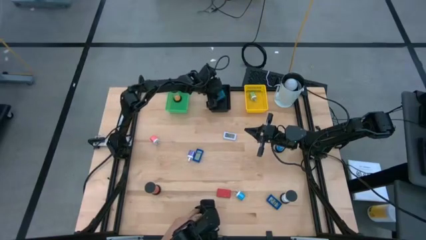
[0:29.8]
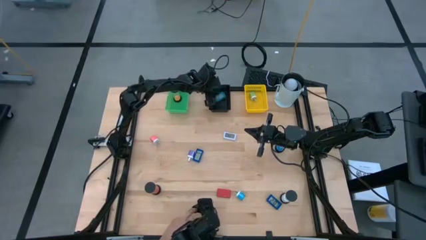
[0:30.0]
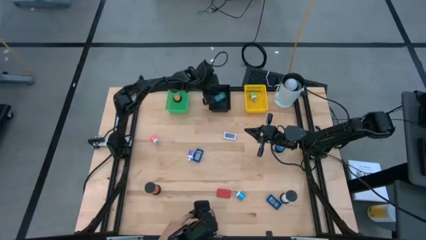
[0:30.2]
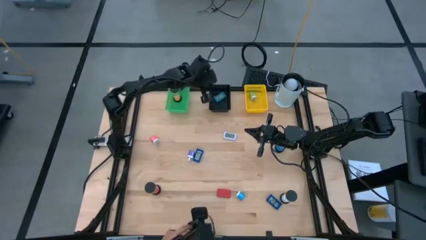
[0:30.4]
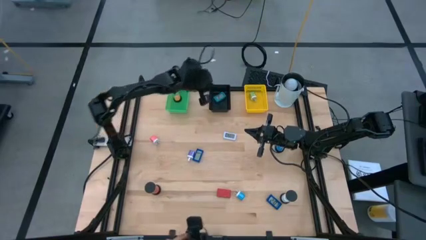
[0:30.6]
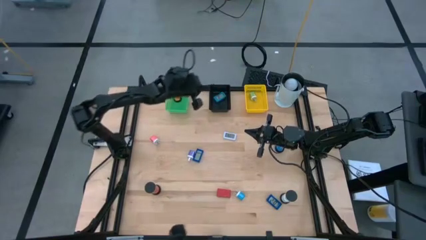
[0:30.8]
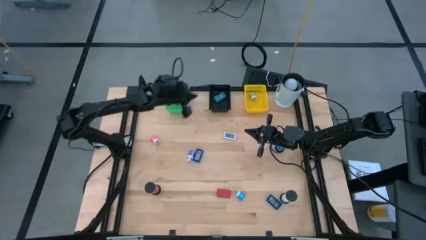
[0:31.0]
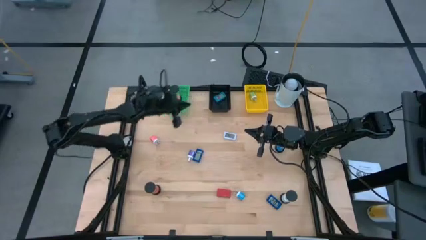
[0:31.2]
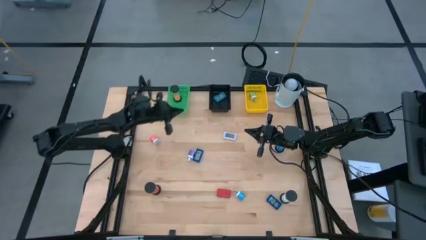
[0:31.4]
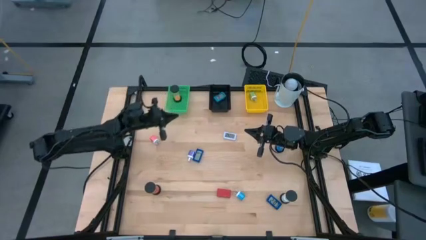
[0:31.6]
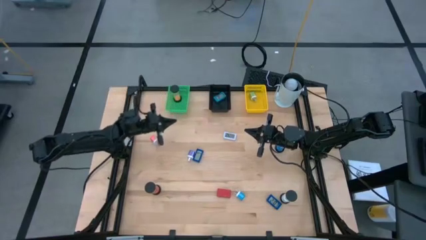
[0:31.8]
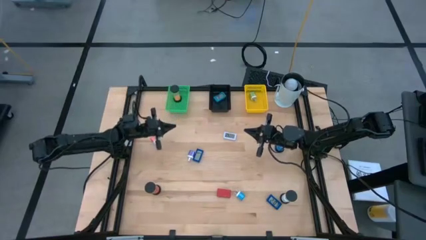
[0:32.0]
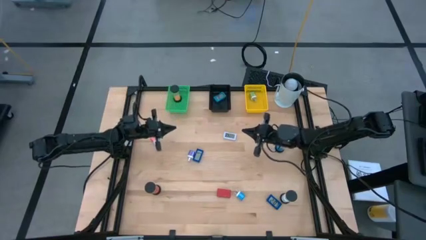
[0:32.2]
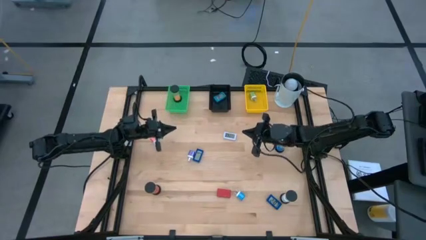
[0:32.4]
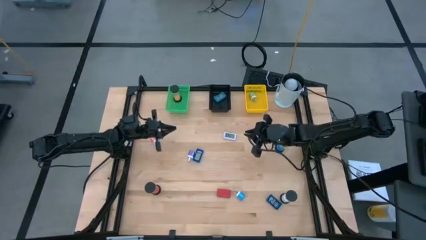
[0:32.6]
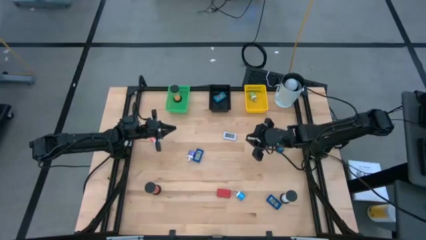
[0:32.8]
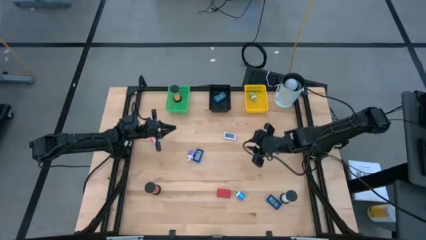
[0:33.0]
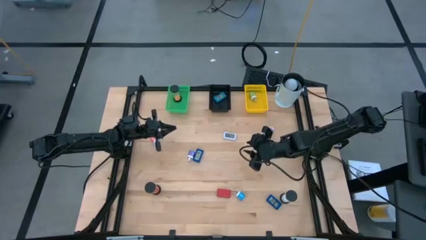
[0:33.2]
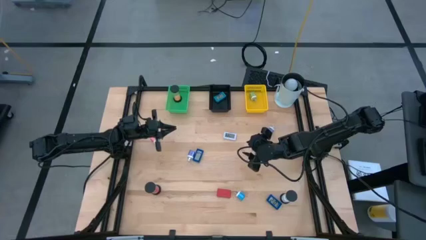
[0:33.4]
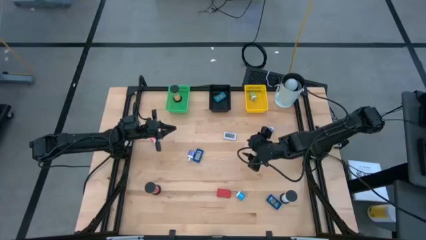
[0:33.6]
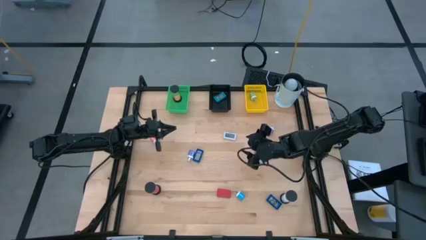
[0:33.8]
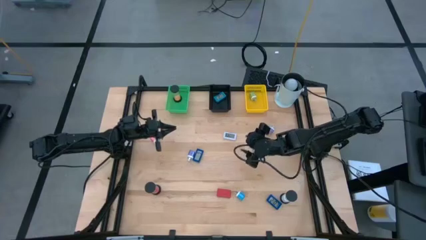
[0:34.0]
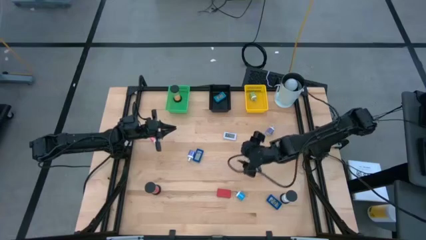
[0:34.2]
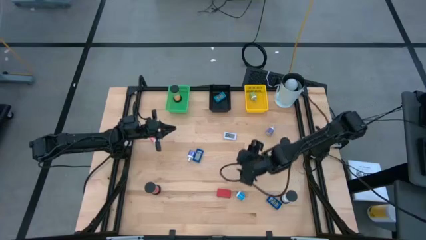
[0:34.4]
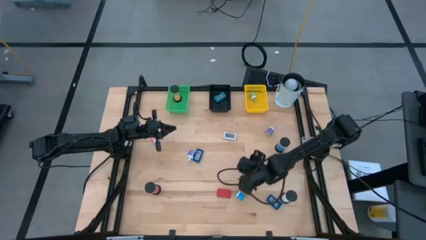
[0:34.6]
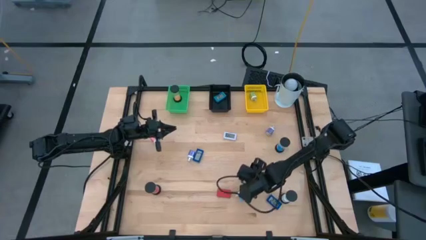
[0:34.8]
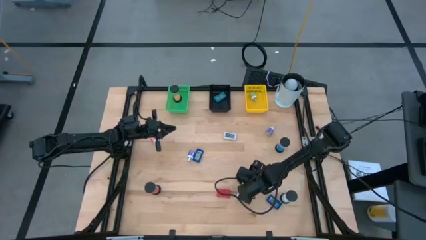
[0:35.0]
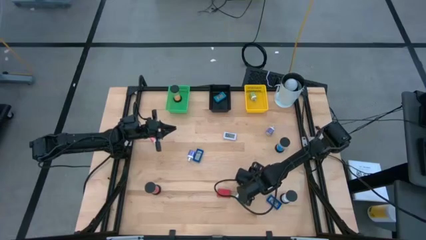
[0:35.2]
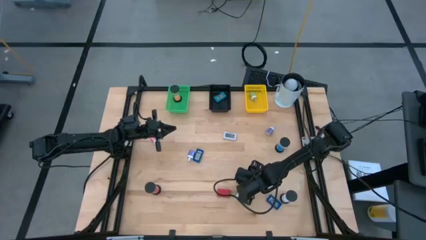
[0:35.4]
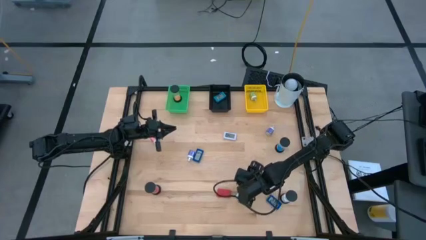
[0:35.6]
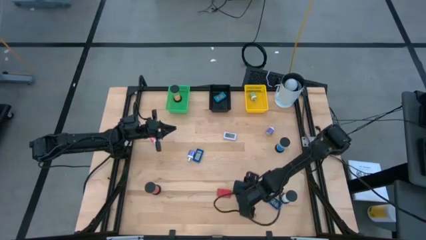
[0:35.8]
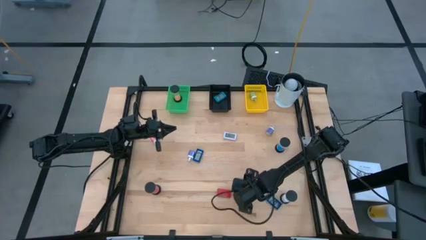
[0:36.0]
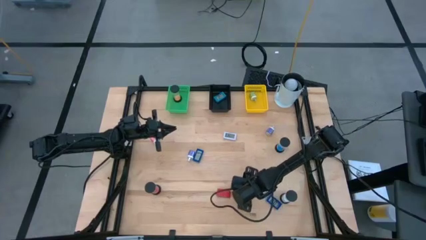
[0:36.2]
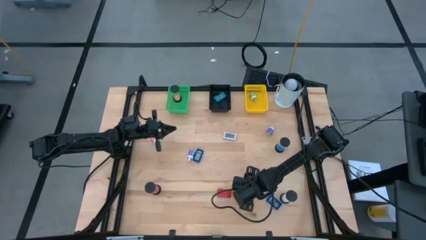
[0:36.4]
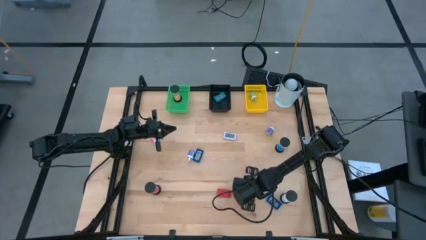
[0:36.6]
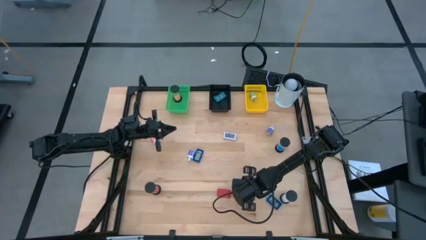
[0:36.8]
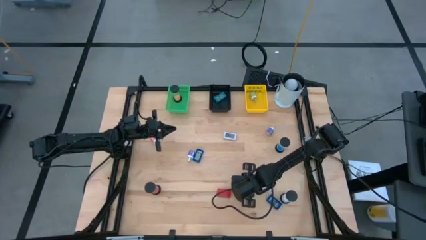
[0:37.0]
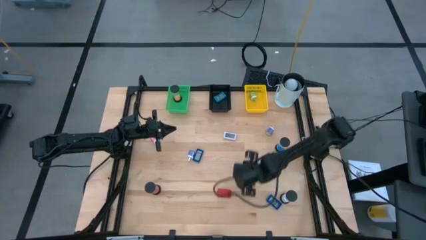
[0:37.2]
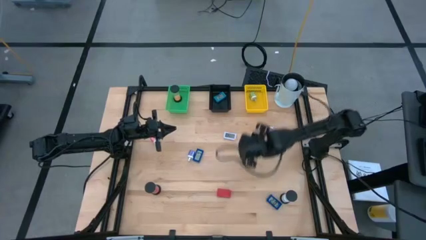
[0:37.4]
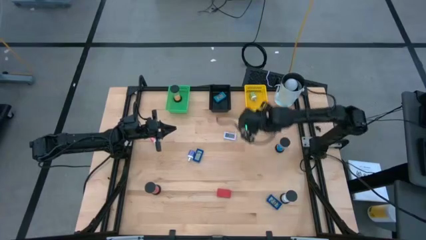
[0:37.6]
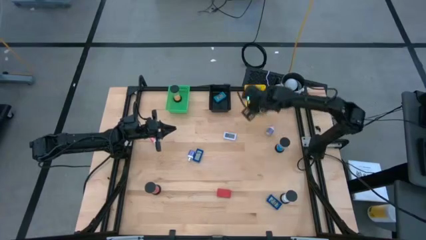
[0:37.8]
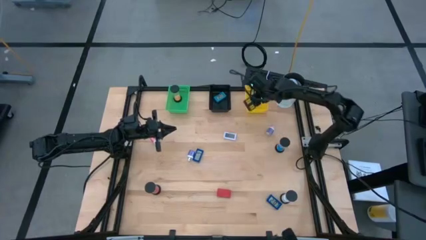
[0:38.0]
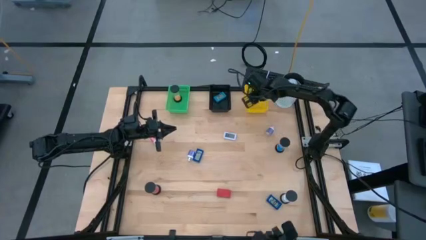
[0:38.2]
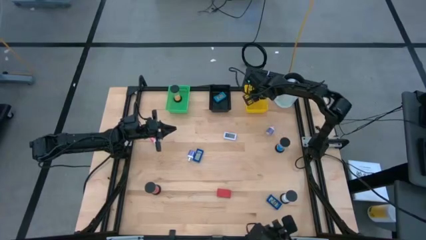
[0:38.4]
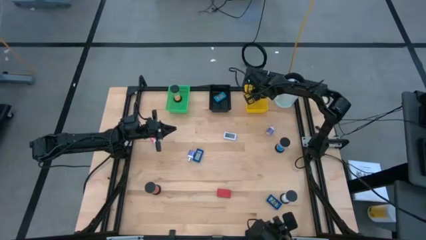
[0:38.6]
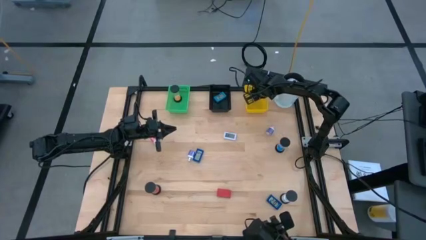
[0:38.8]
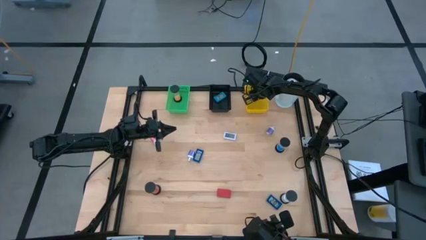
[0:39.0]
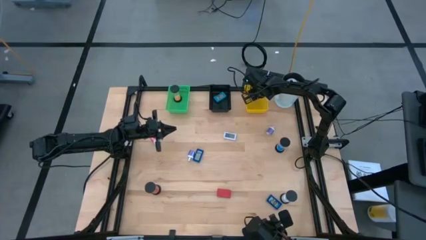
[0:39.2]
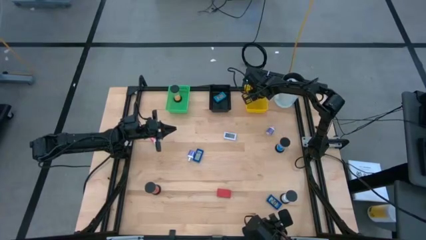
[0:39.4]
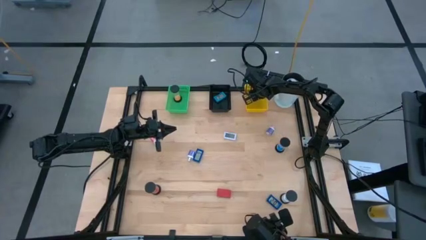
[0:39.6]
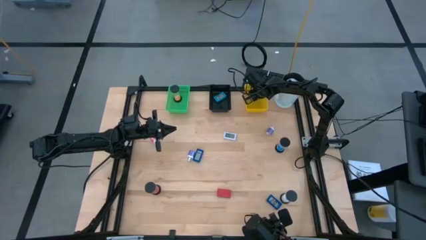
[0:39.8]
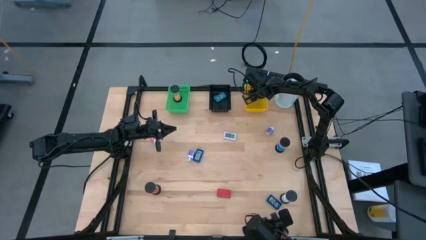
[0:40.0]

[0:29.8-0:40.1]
Task: Pick & Place Office items
Put the blue charger adapter into the yellow bin

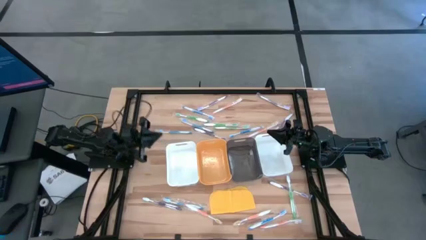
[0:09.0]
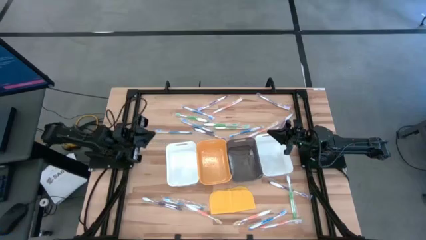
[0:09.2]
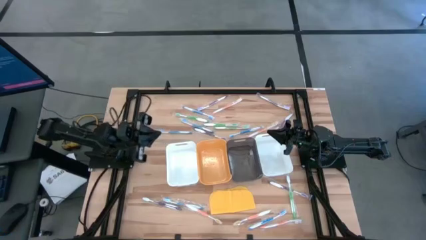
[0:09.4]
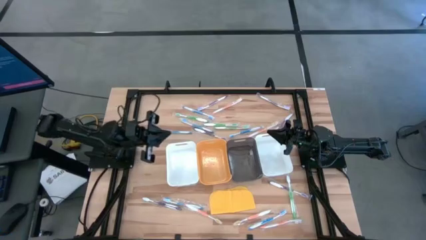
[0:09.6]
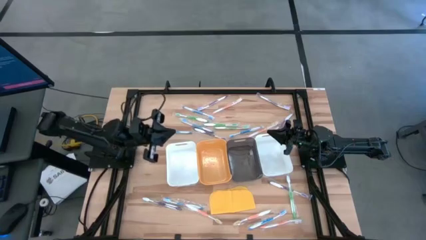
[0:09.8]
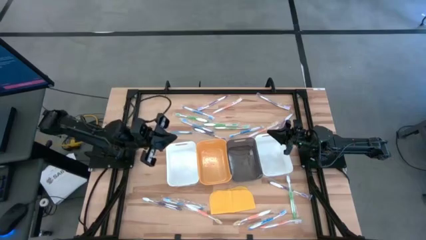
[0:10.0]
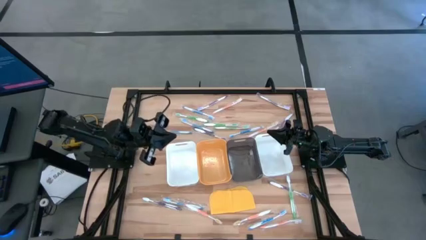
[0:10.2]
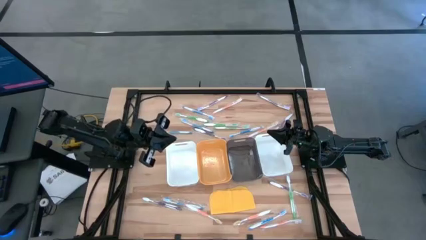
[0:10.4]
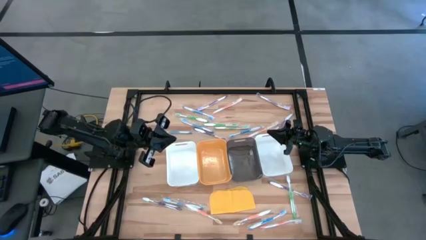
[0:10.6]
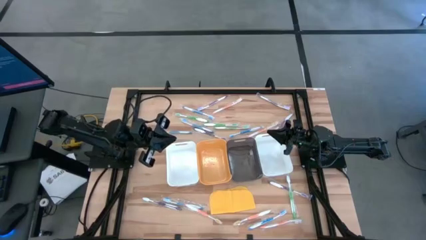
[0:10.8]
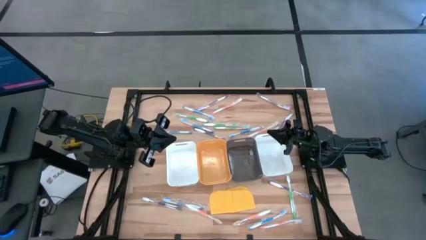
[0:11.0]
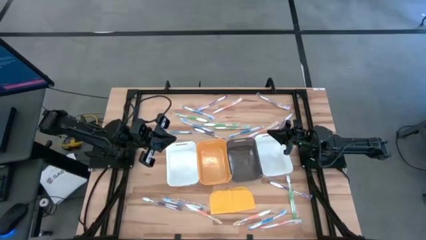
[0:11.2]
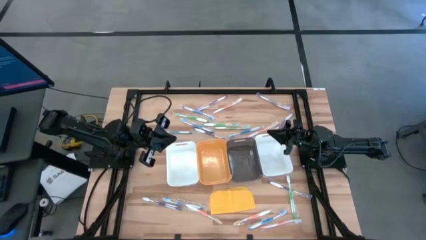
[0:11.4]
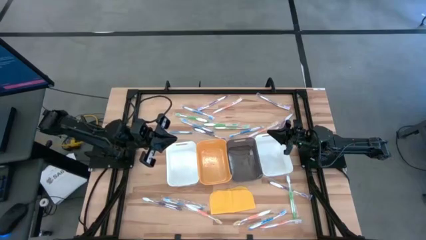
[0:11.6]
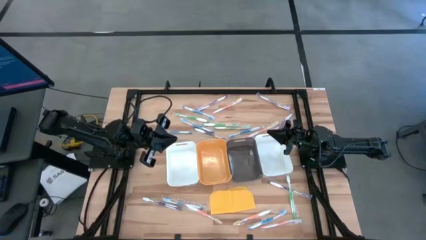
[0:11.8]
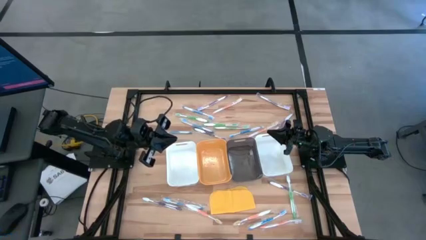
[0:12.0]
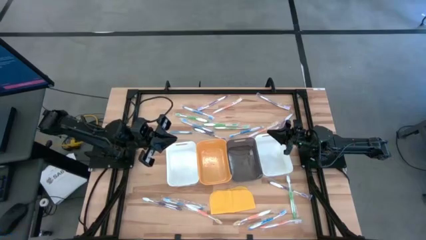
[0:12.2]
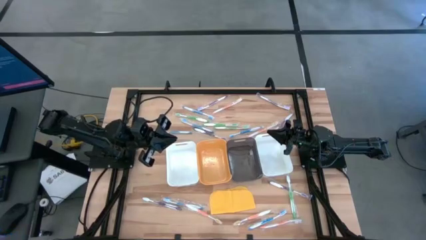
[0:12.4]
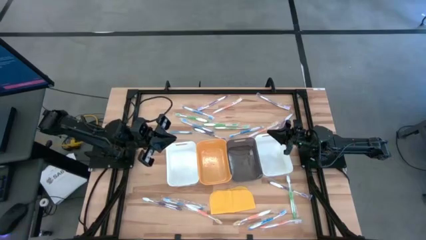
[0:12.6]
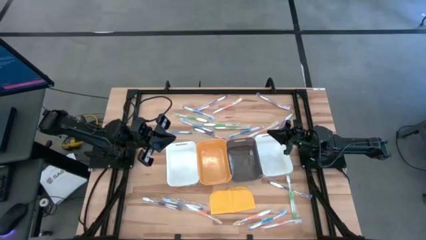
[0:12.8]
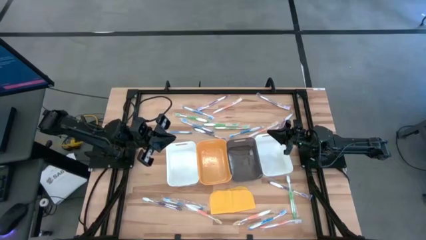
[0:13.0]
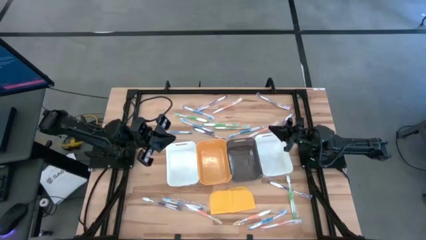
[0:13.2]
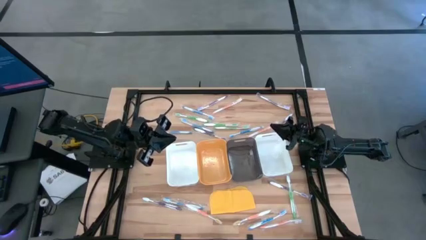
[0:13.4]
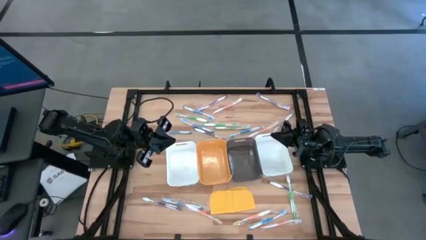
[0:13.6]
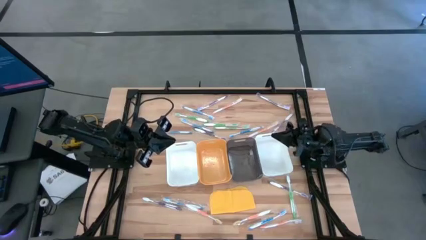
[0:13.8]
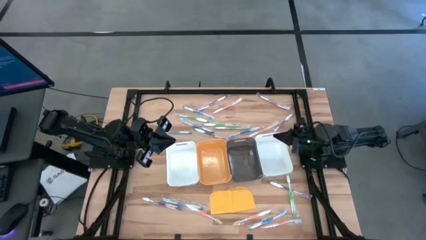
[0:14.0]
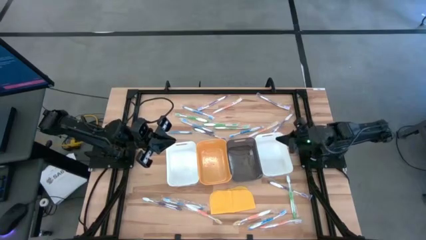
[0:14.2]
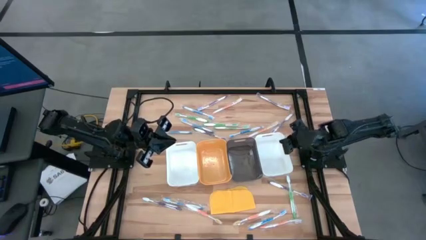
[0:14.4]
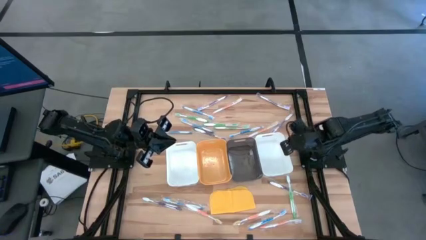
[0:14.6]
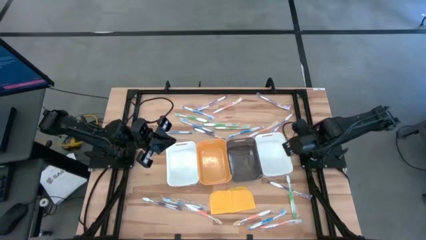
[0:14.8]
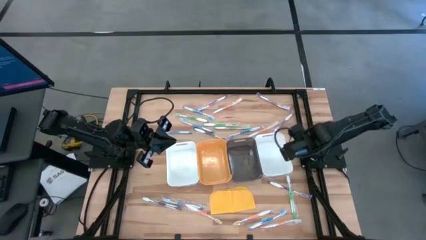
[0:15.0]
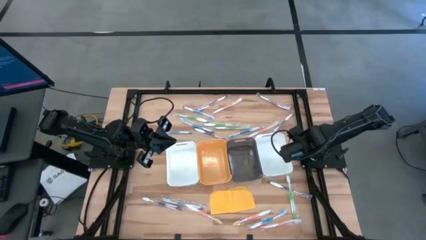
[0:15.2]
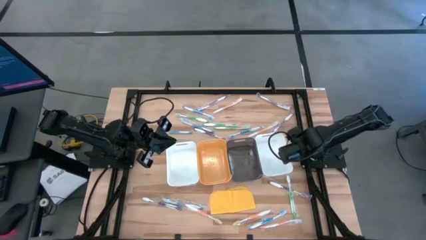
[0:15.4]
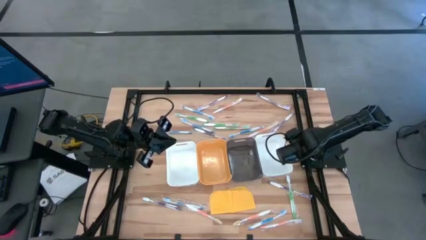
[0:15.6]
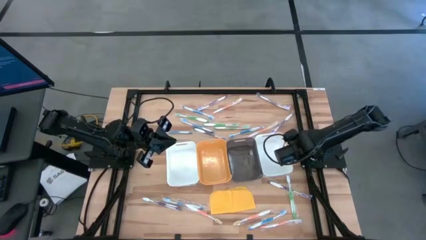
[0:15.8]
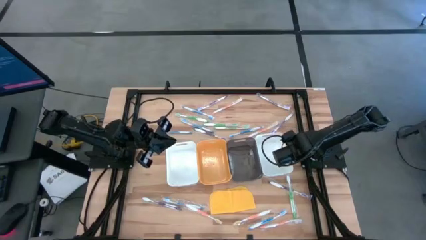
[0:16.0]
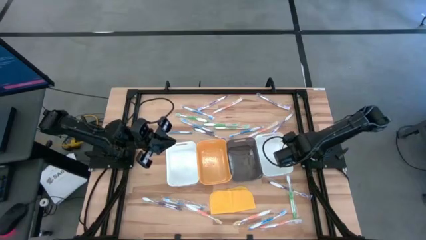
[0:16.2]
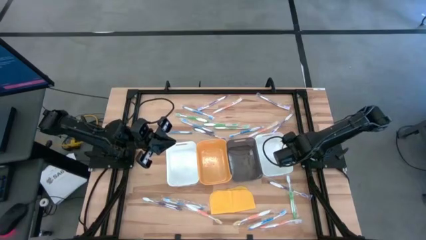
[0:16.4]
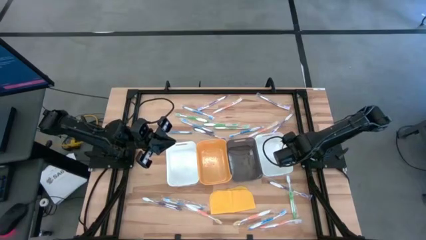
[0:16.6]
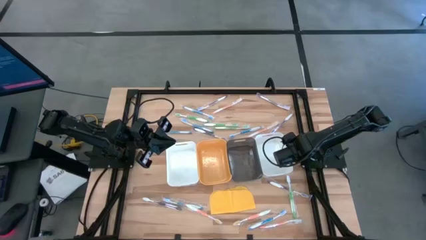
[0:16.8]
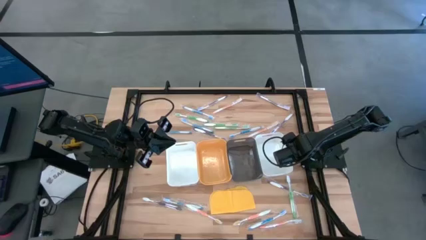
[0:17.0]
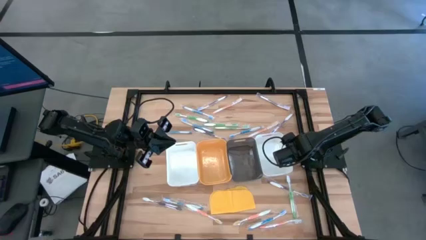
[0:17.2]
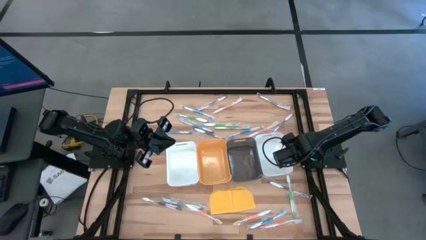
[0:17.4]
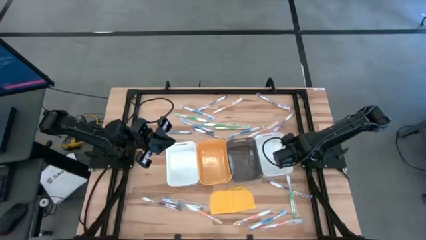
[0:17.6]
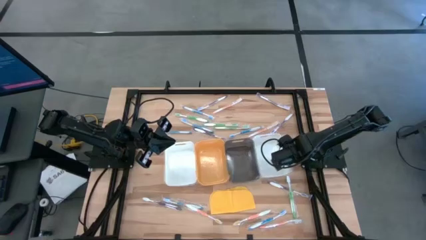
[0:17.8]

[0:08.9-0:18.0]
Task: Pick & Place Toothbrushes
Adjust the bins
